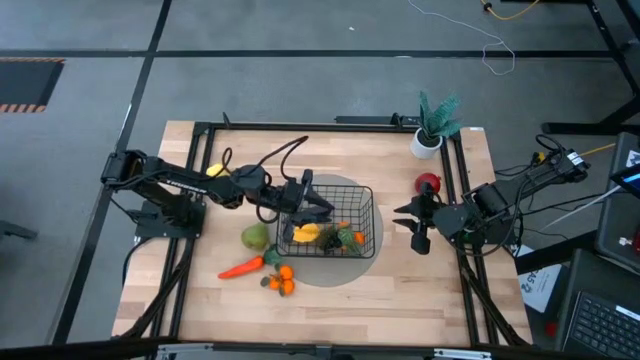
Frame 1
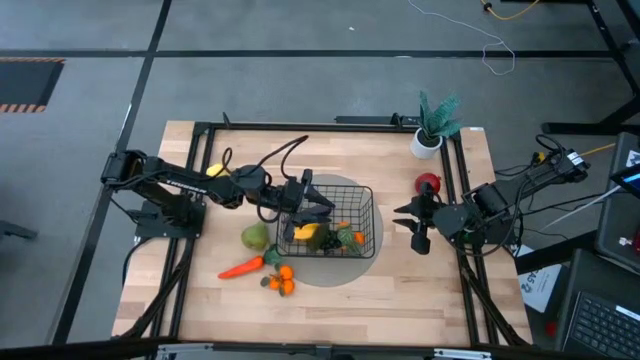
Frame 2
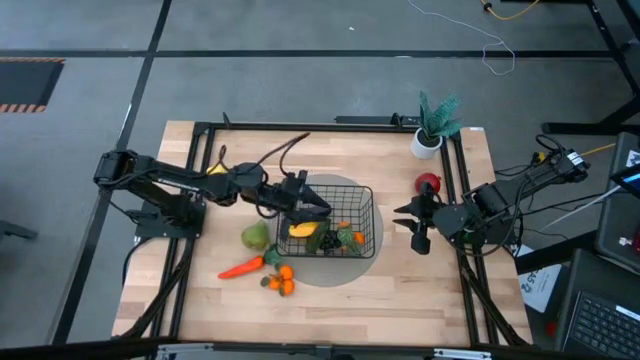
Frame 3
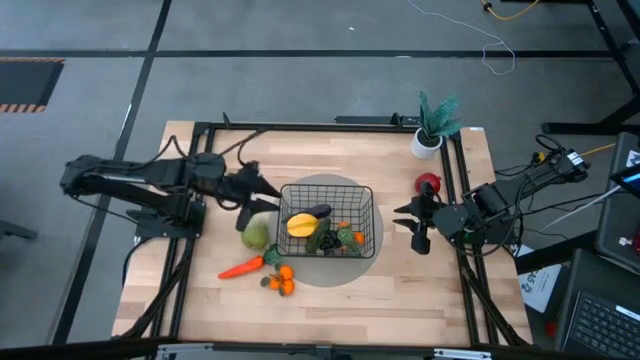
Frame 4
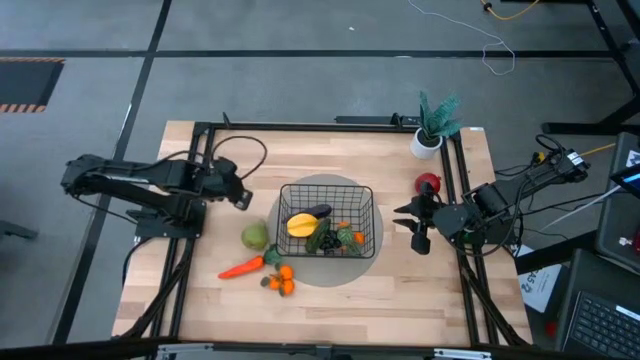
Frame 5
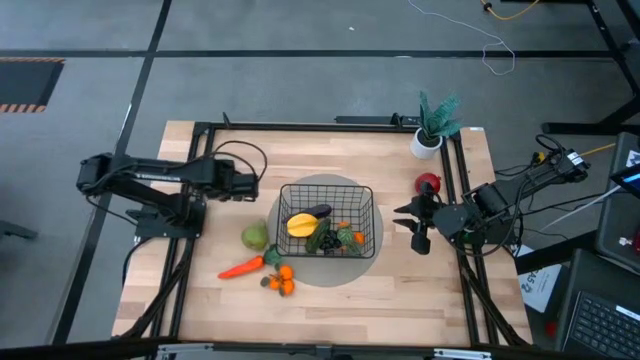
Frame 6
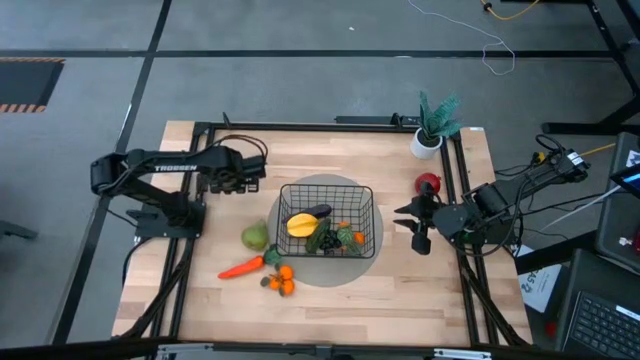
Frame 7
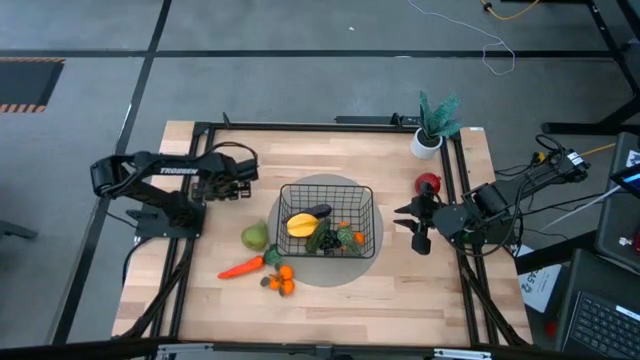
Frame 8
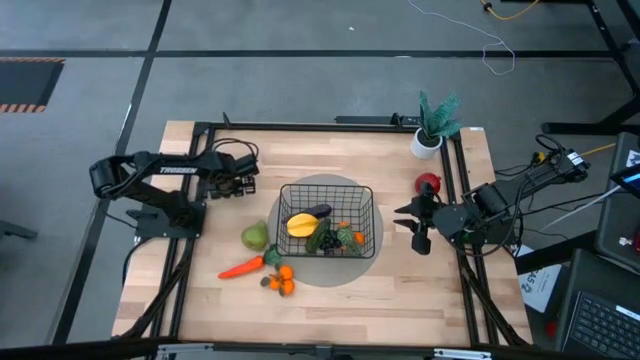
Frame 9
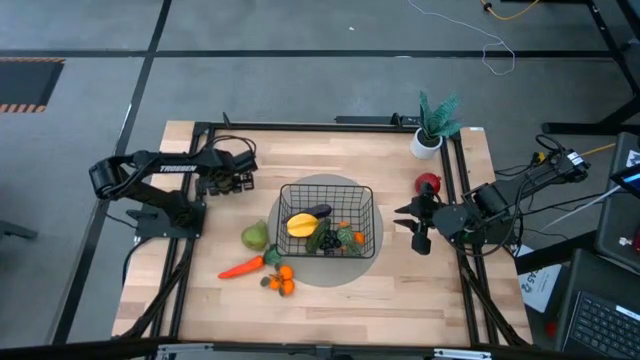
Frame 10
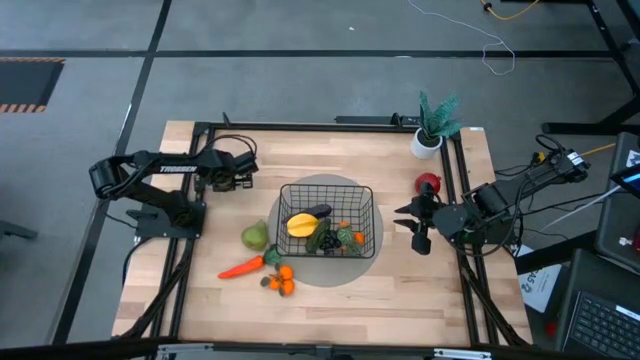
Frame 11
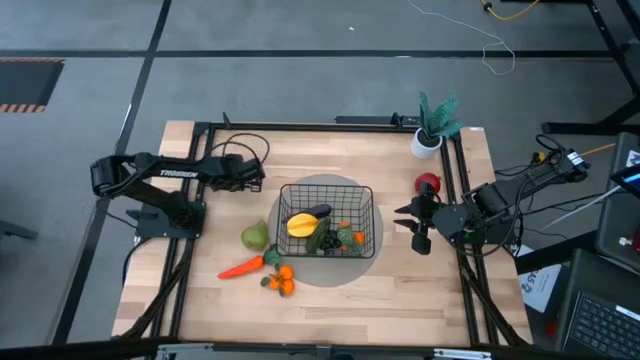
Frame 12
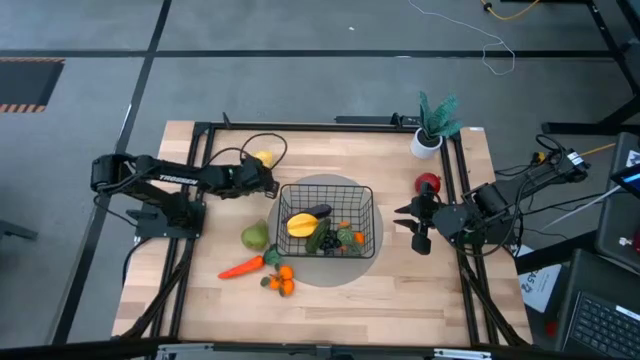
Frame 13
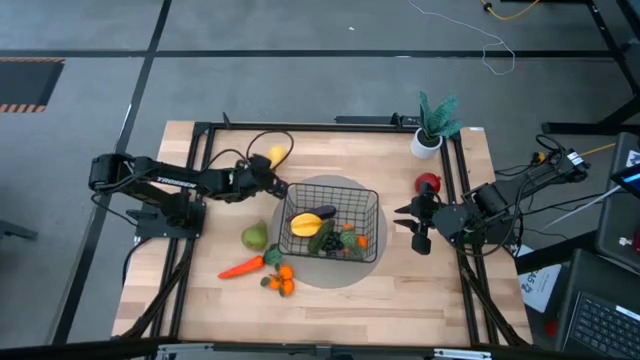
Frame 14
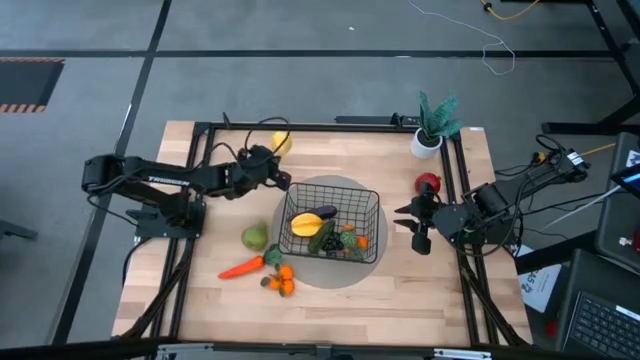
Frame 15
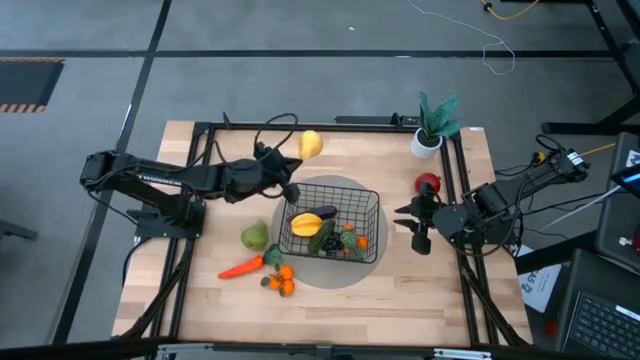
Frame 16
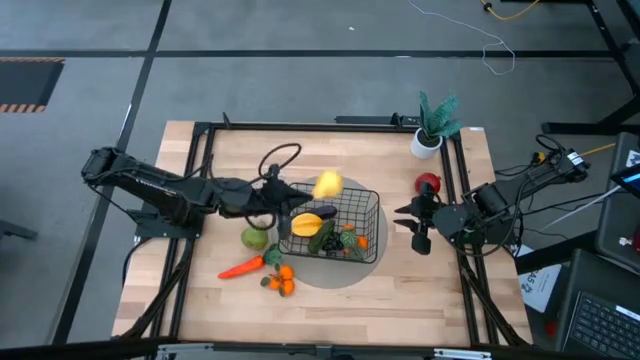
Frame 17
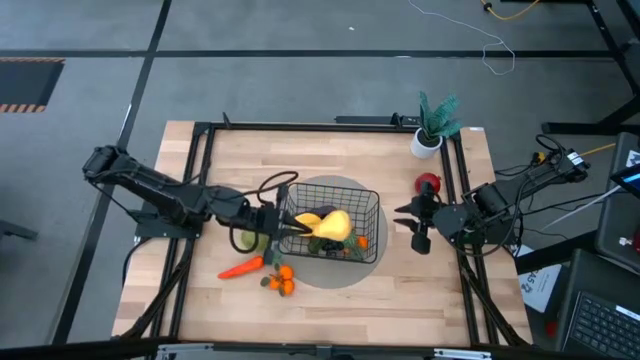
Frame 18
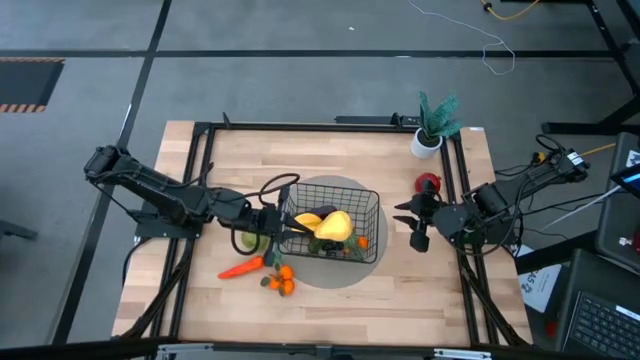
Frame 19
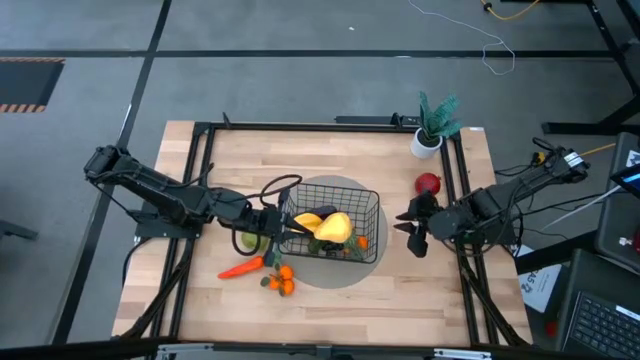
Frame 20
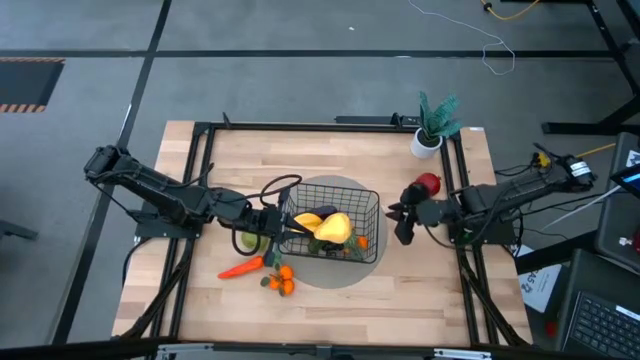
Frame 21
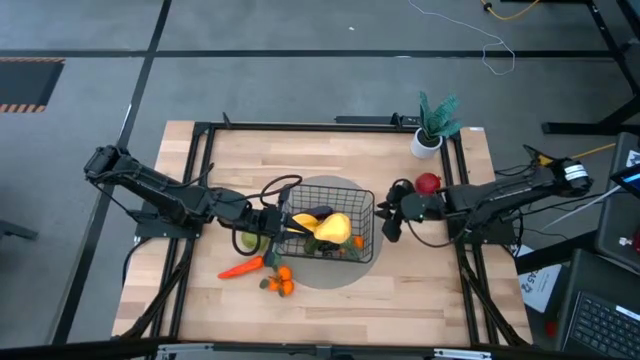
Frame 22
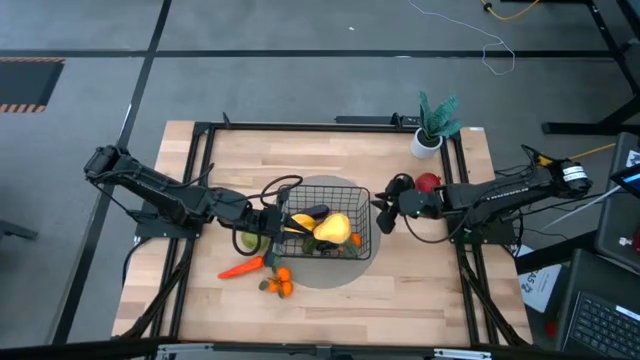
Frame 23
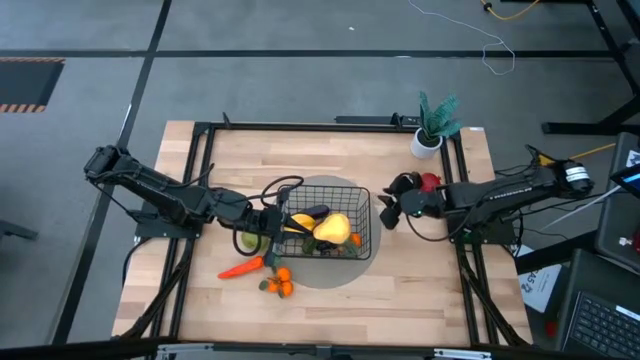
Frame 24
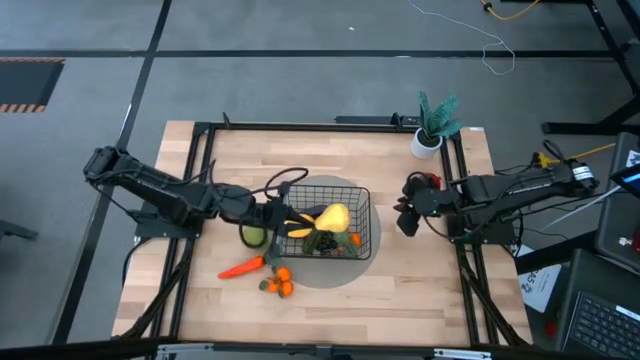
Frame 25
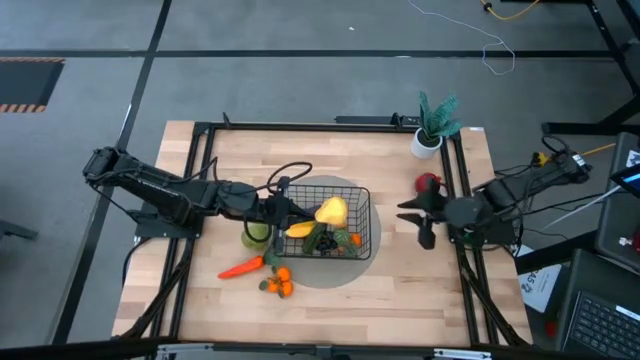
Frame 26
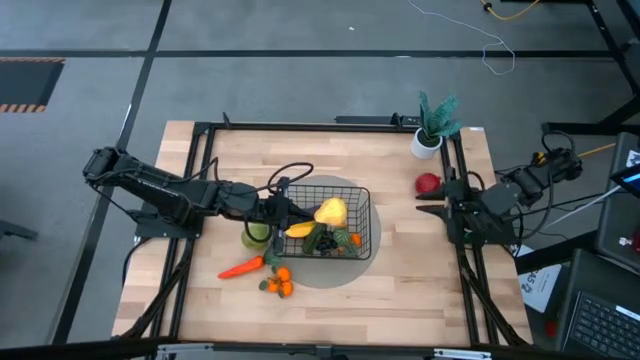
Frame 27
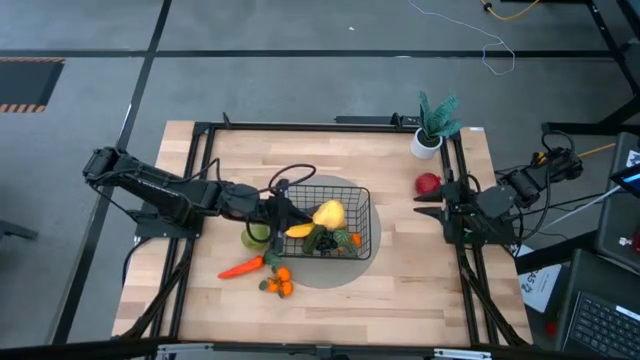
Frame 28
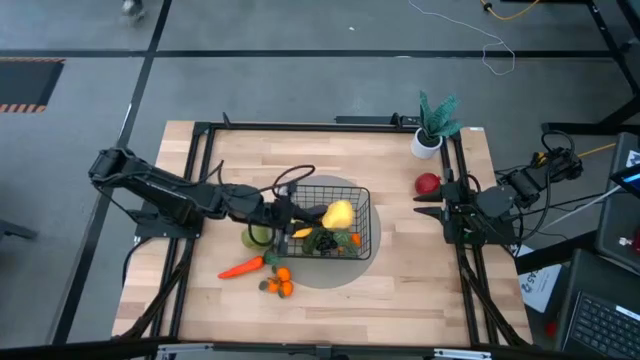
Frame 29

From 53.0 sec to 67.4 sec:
Task: Build produce basket
Put the yellow pear into the black wire basket

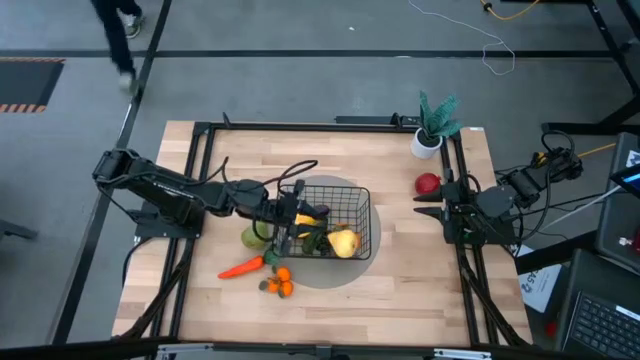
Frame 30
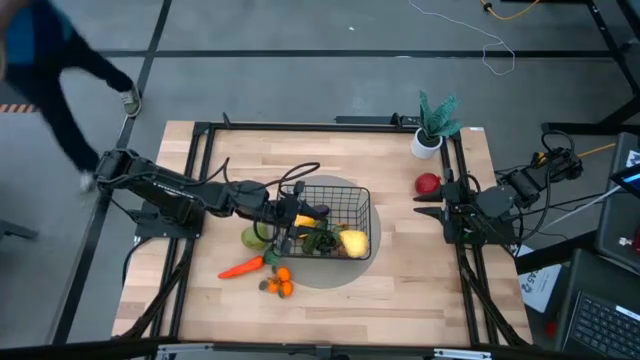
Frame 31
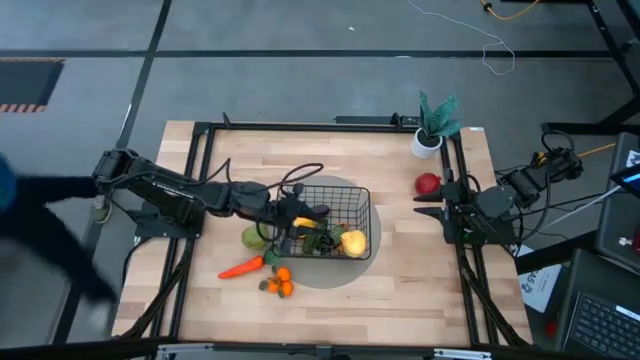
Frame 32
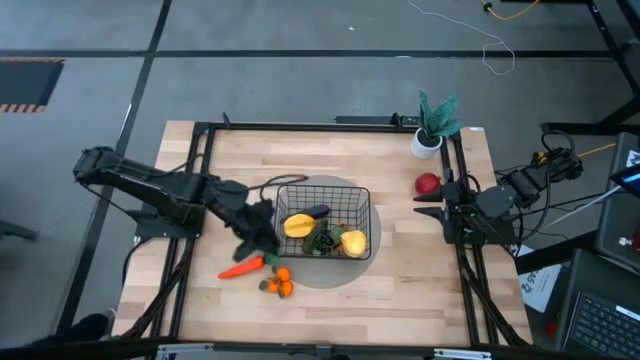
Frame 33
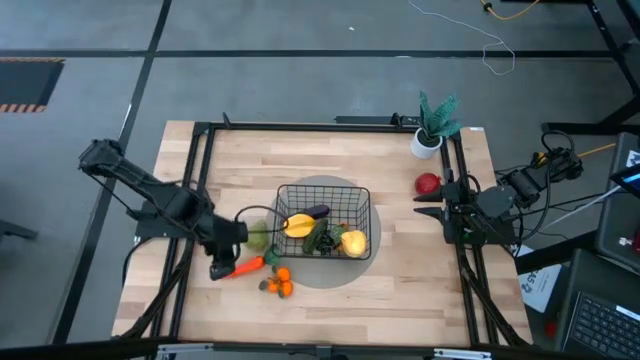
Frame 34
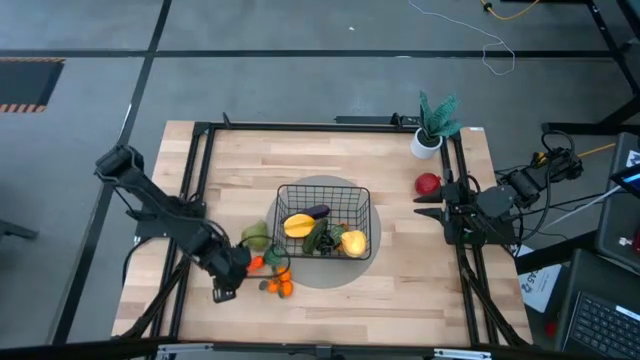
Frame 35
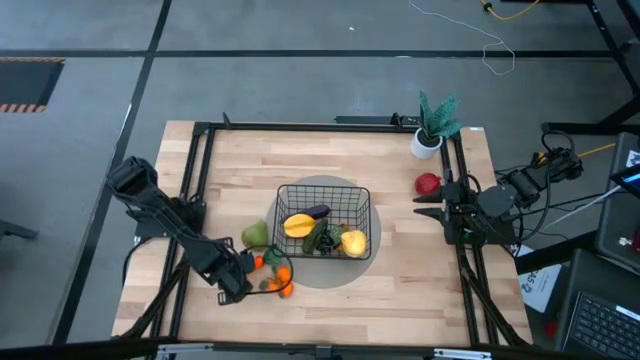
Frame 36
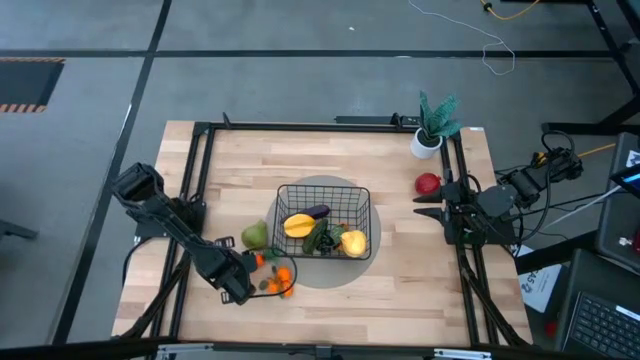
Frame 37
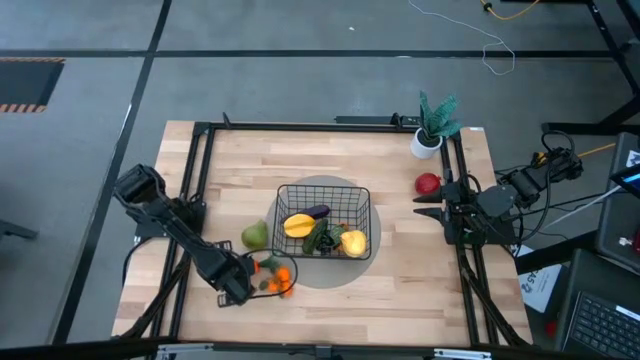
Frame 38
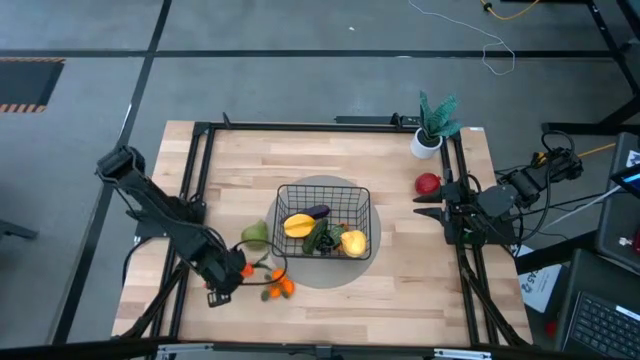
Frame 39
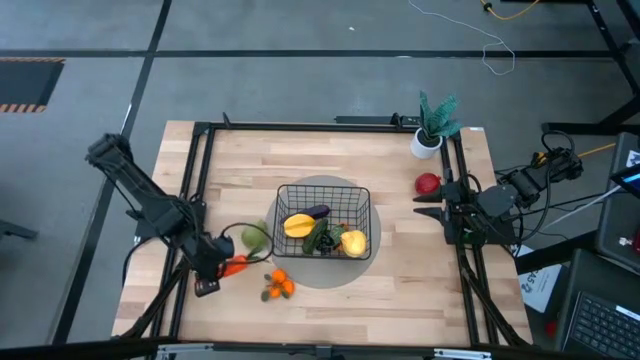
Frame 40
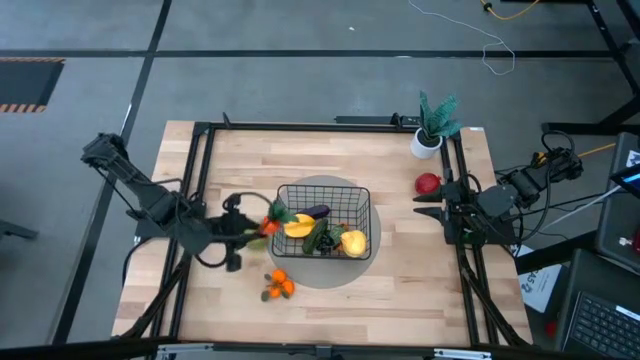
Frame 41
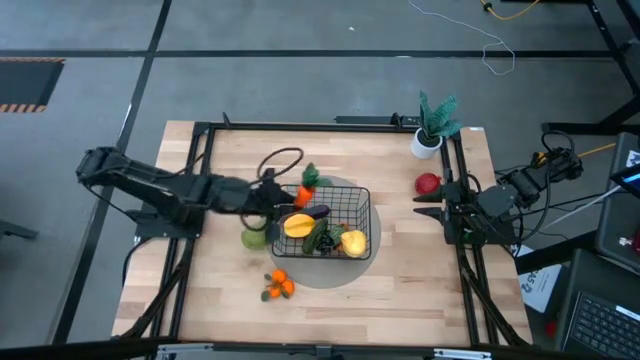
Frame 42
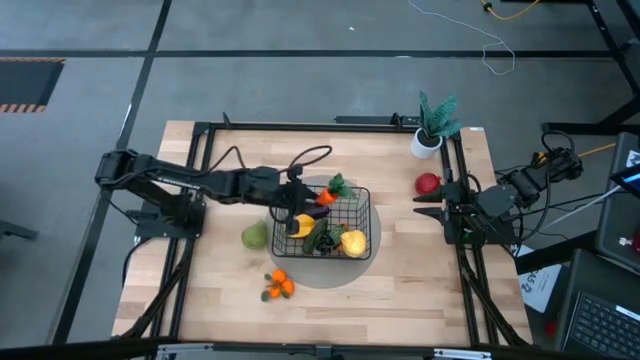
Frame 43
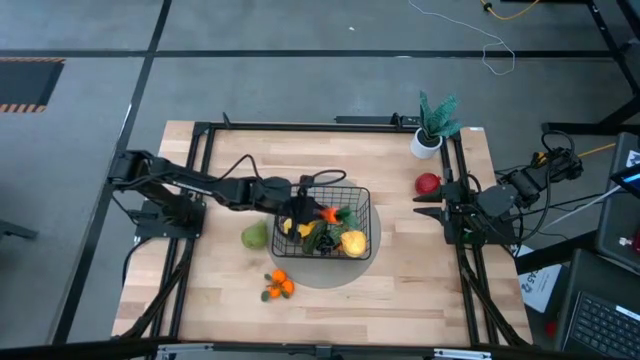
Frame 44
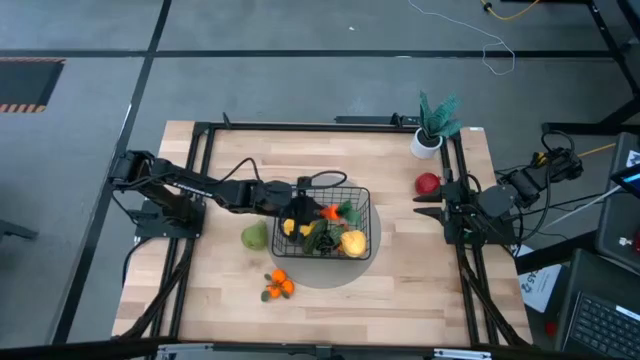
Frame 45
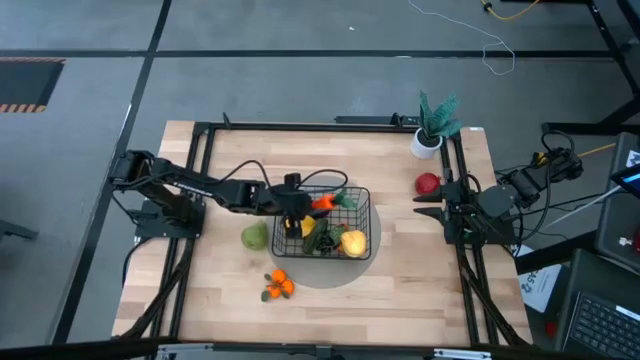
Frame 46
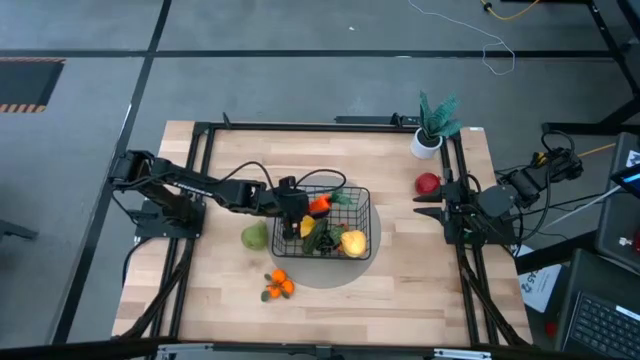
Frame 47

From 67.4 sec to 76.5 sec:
Put the carrot into the black wire basket
